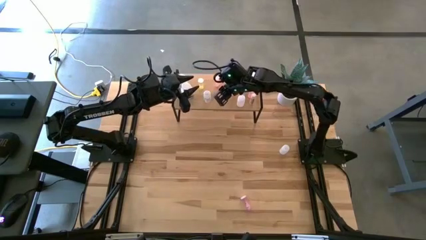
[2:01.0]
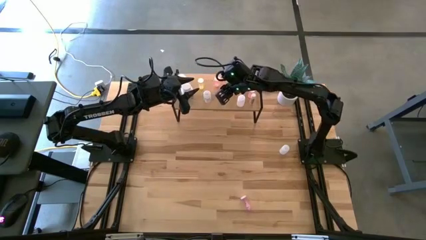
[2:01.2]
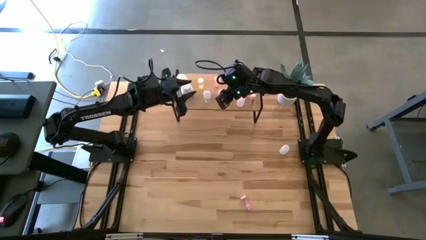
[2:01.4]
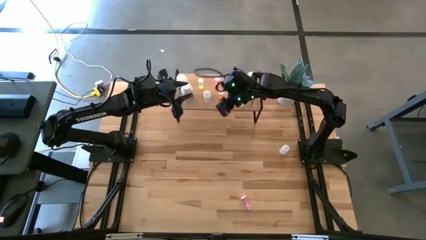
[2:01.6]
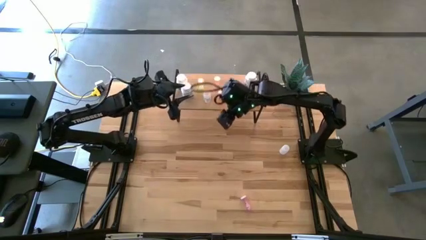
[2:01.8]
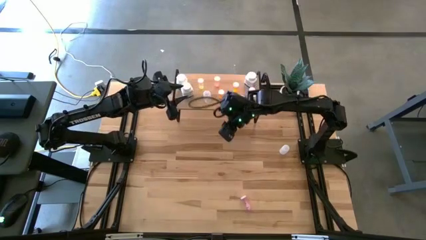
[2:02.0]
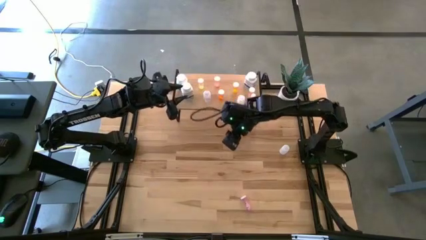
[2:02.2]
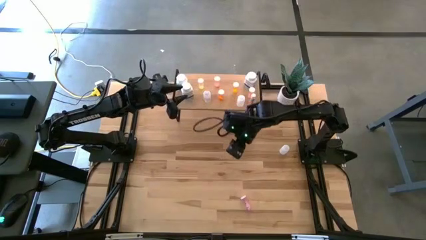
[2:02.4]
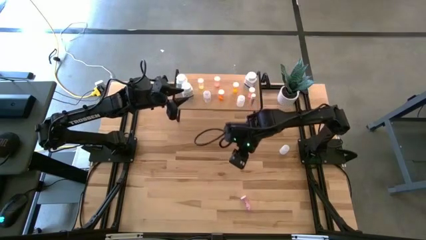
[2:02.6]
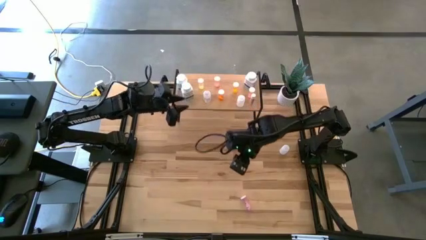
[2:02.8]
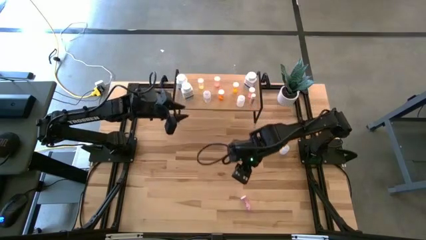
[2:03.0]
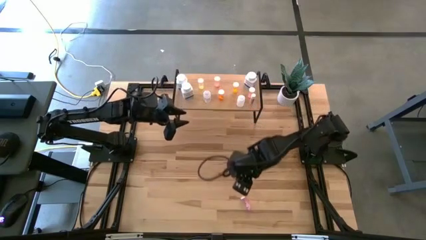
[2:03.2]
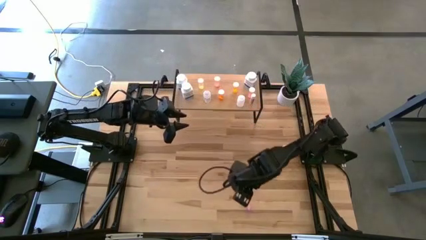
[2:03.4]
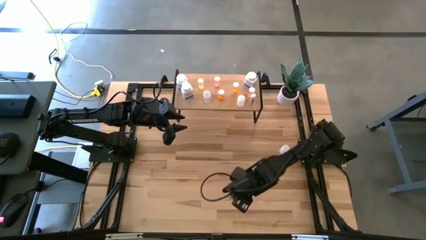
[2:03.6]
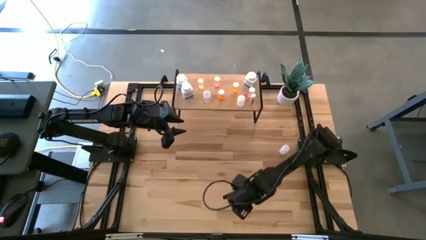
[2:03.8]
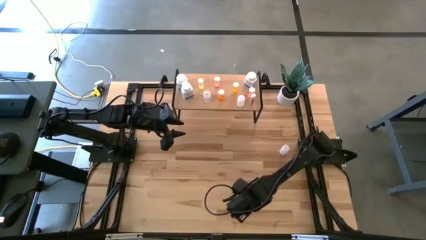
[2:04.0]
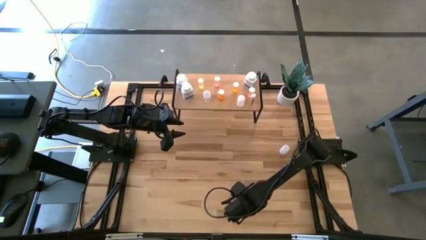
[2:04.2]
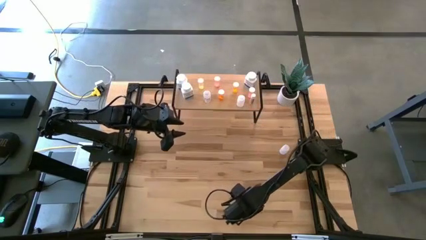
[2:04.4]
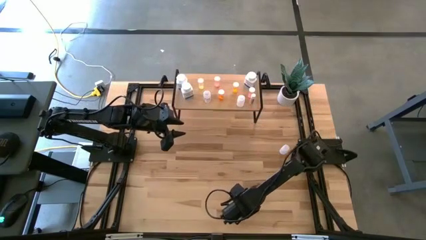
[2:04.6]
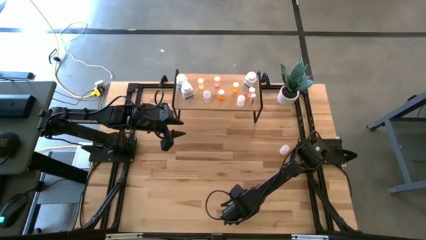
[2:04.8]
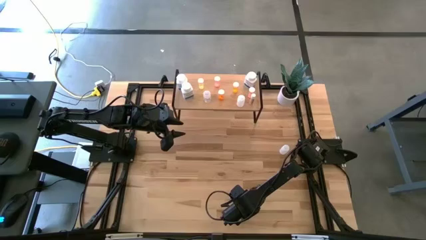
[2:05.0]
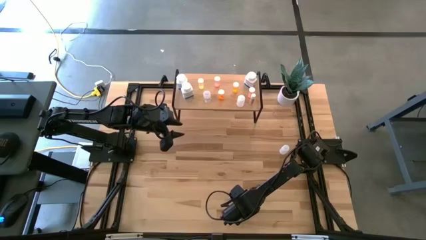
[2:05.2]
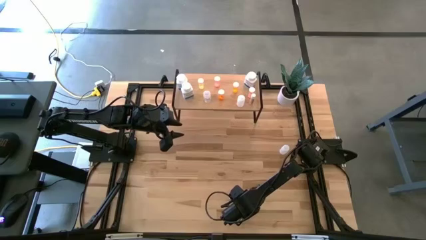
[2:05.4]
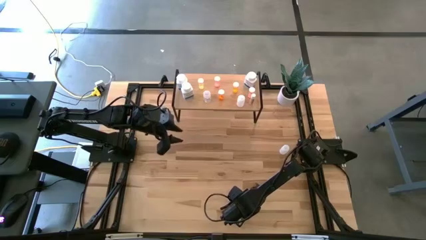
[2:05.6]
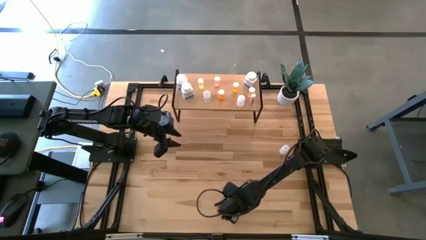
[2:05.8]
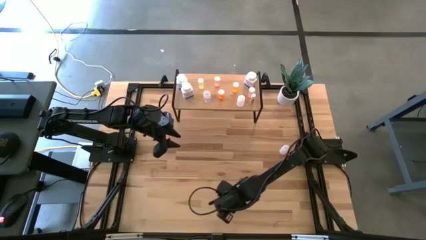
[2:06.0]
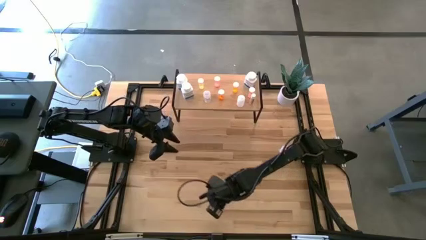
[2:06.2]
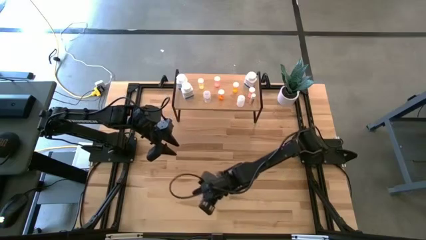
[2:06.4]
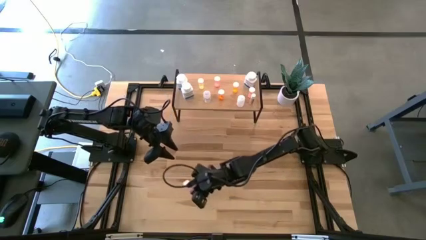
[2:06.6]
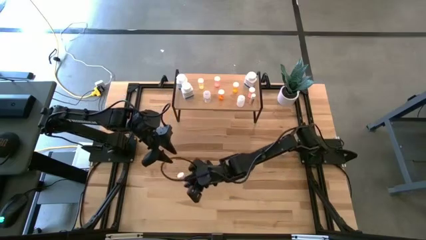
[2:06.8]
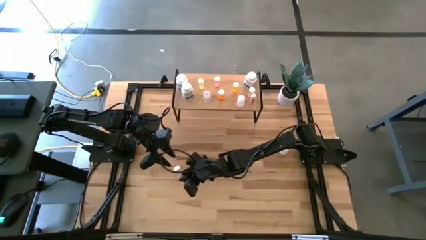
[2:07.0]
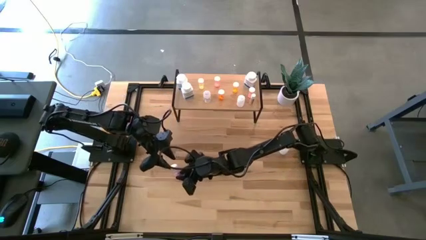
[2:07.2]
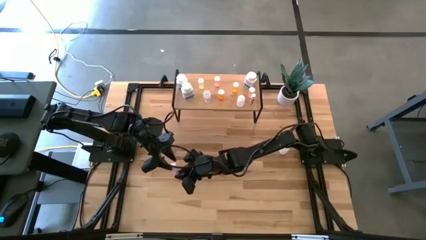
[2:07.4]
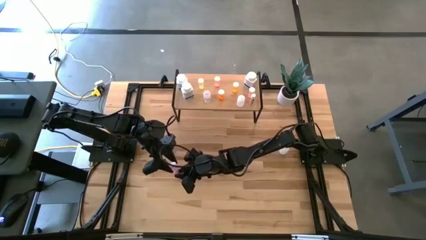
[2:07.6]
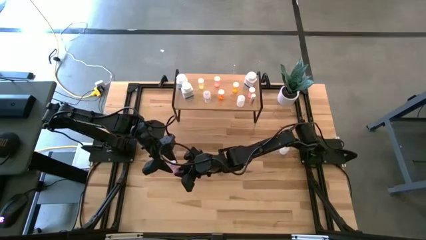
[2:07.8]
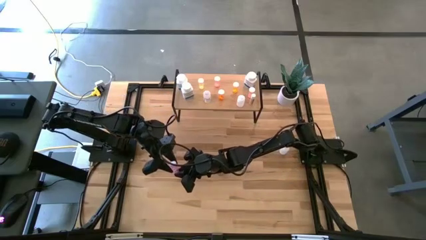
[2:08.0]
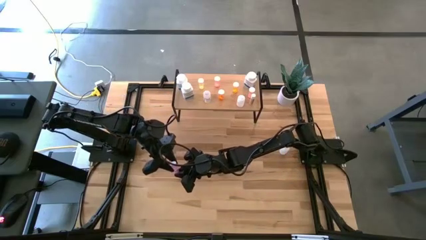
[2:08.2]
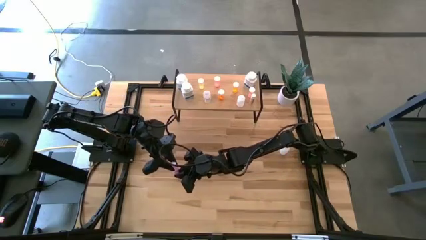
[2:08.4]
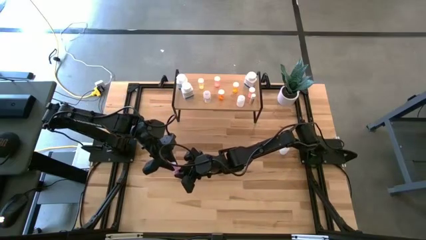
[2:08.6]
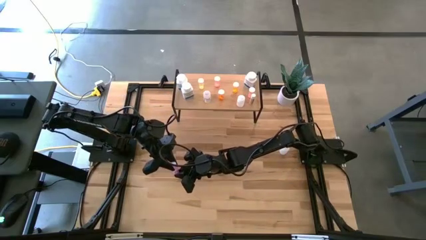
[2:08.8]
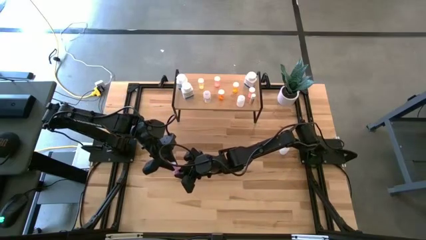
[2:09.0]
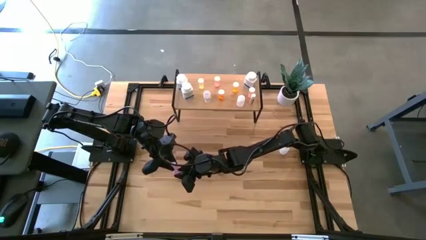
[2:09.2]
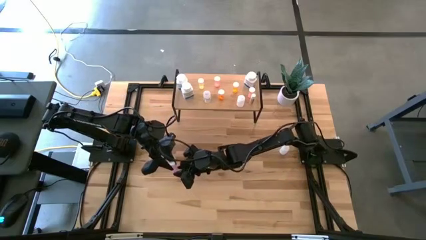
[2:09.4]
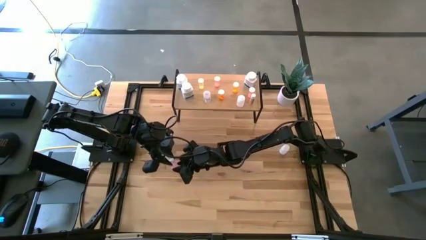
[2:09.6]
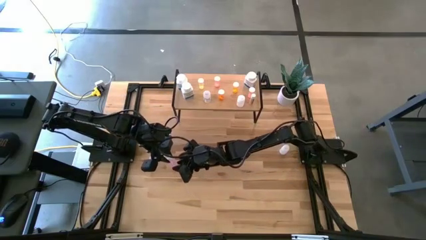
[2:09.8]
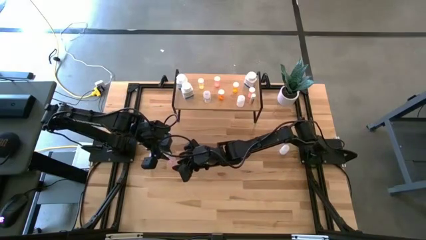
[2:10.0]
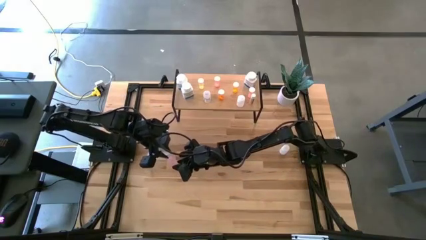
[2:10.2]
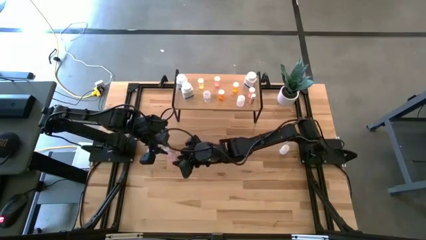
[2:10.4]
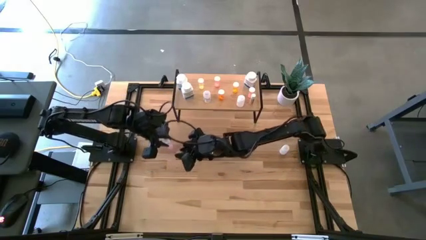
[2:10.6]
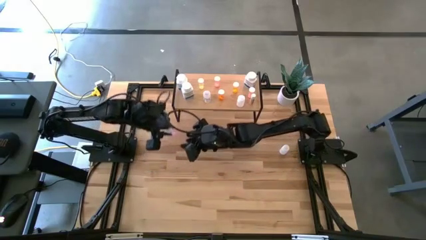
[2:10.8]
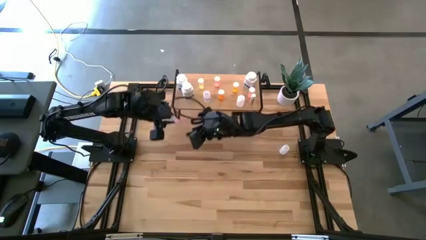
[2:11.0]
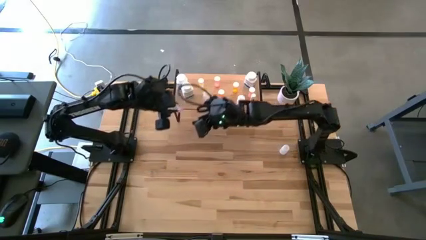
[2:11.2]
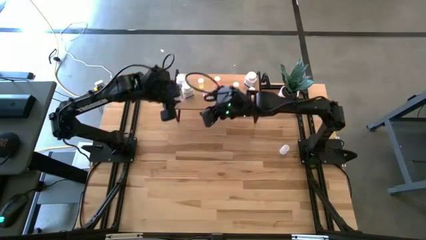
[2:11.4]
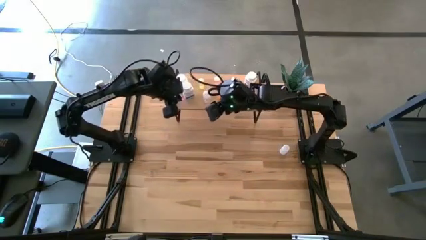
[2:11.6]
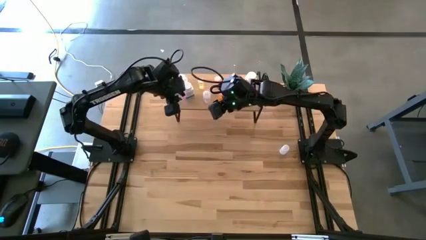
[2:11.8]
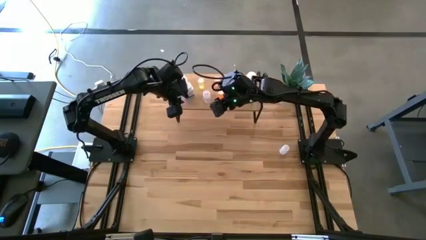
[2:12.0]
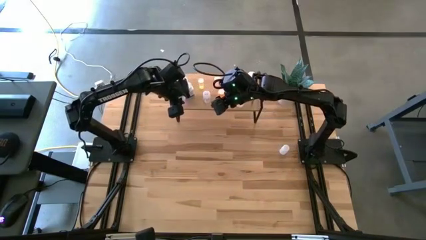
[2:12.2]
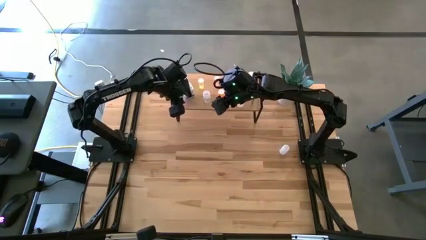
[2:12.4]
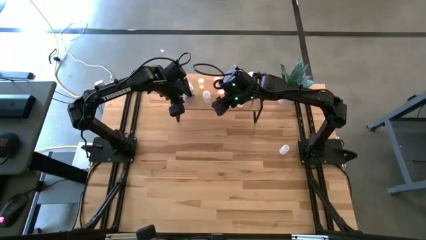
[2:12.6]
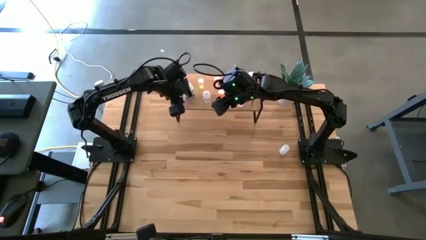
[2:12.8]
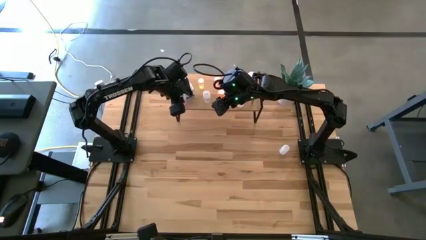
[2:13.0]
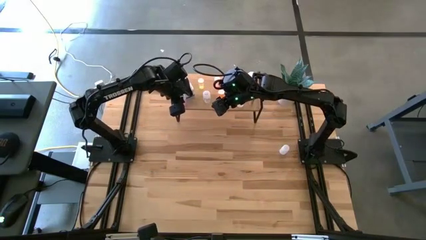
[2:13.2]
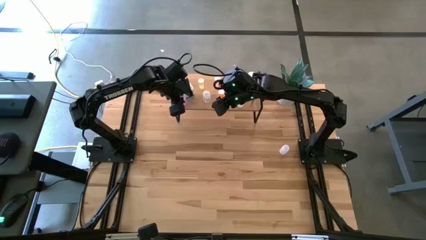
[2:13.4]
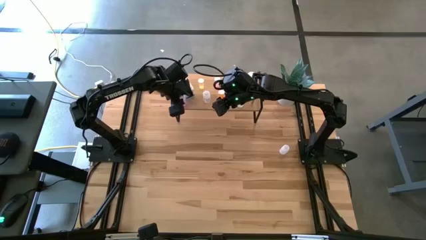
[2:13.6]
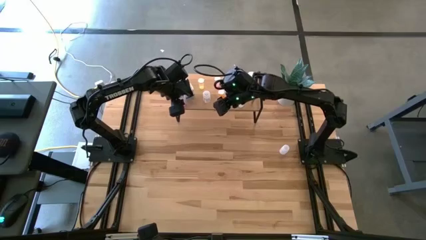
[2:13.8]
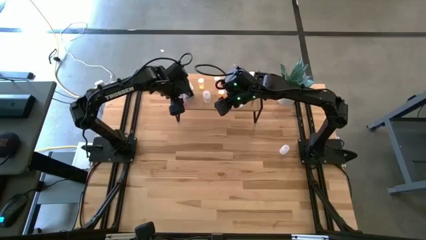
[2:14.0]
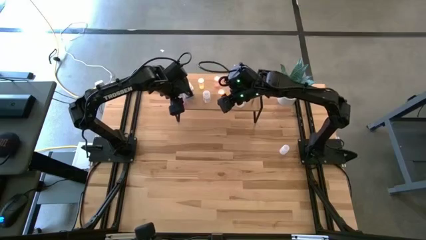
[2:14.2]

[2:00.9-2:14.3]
Task: Pick and place medicine bottles onto shelf by color
Put the purple pill bottle on the shelf

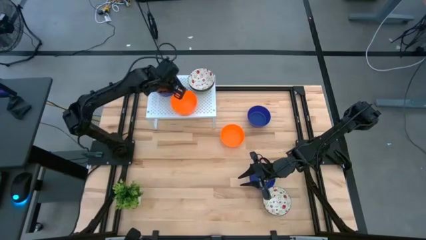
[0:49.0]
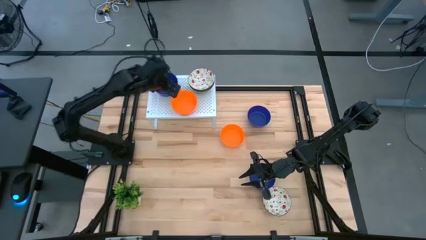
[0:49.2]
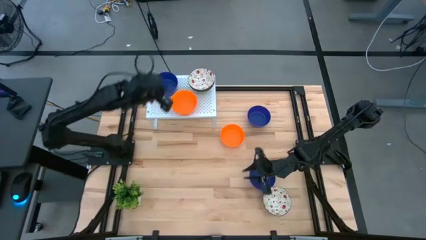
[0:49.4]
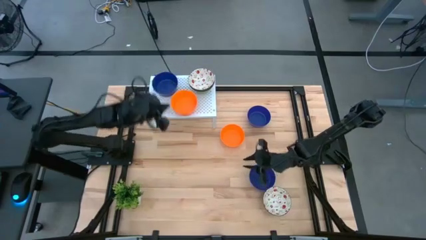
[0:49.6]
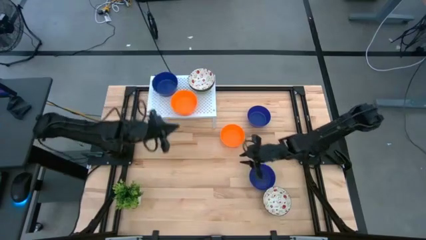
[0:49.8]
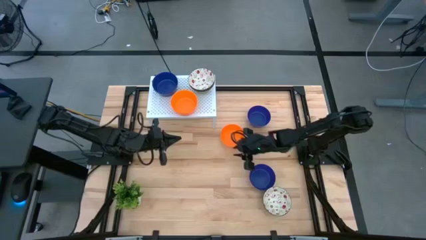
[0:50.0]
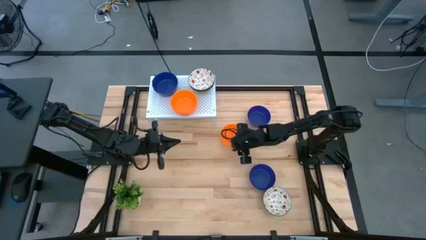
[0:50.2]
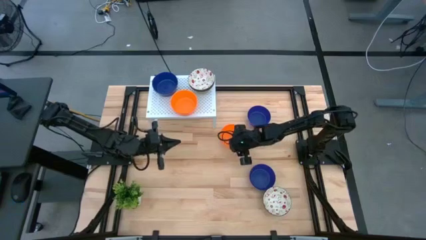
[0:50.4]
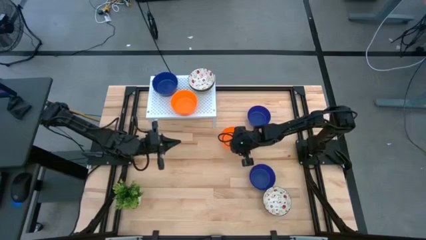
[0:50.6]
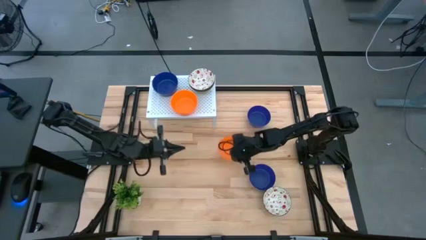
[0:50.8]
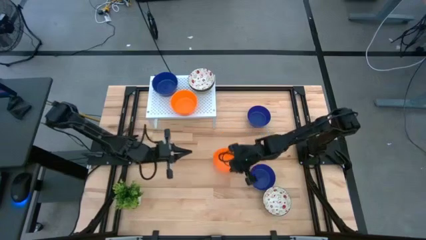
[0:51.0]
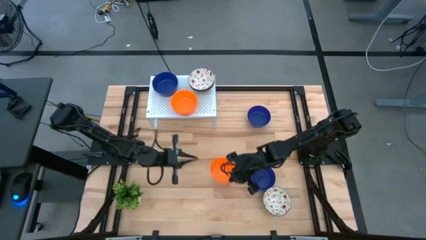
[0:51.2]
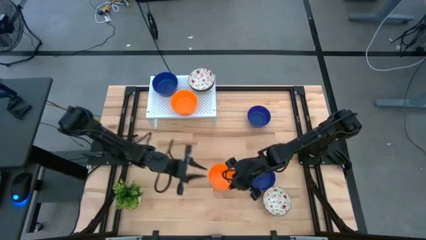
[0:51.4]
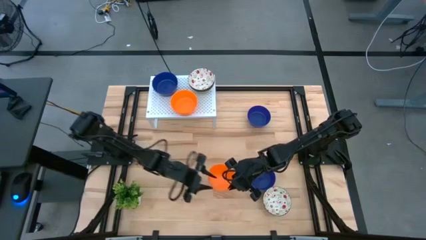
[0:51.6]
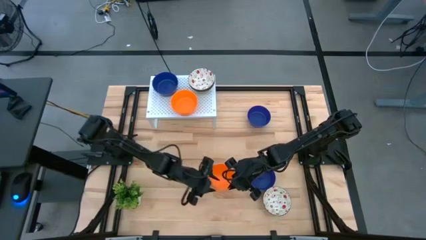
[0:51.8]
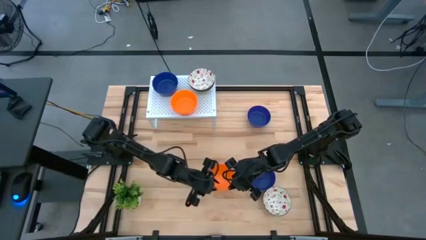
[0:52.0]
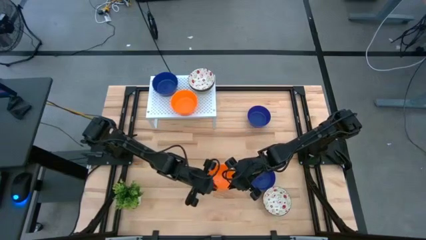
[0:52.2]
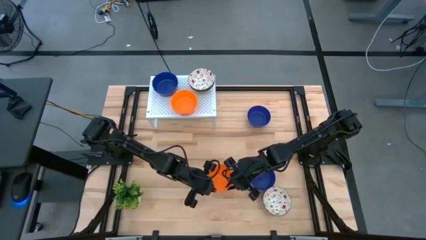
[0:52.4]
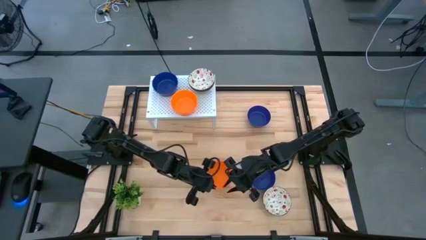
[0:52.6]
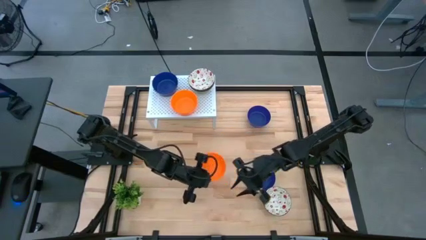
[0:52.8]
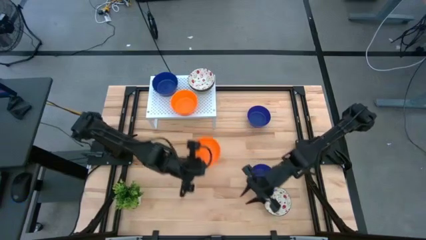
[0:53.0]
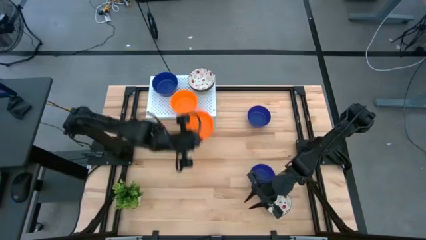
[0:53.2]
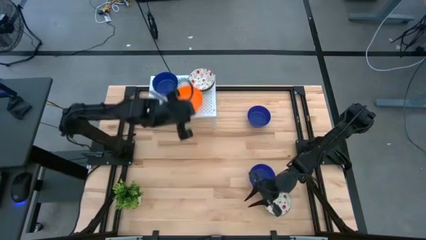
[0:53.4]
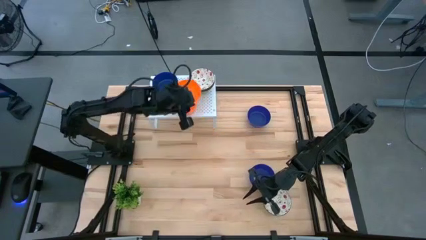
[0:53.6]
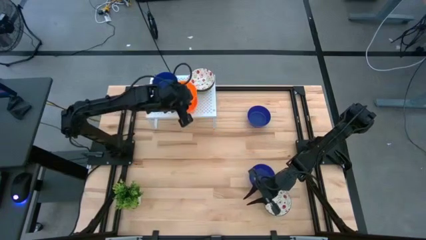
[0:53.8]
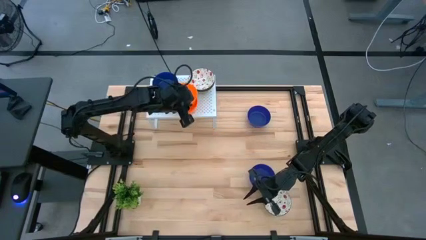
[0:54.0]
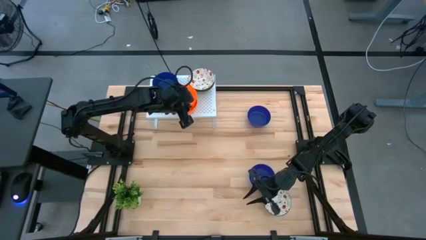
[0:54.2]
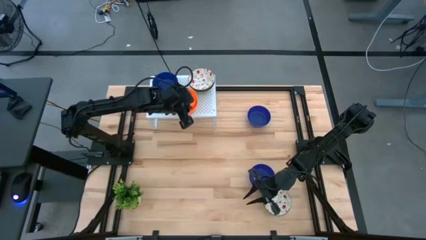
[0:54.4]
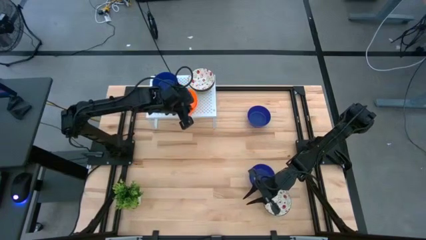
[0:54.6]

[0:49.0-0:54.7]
Task: Pick & Place Mini bowls
Stack the orange bowl on top of the orange bowls on the shelf
